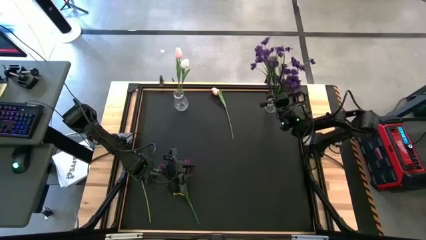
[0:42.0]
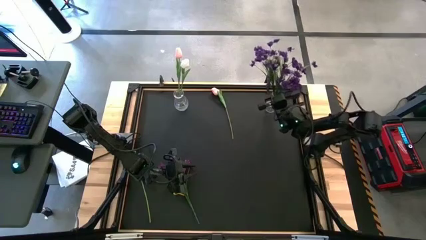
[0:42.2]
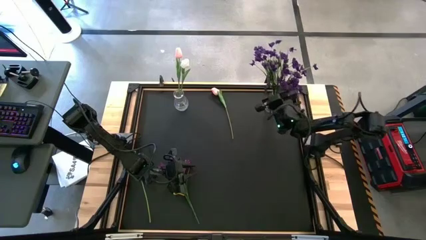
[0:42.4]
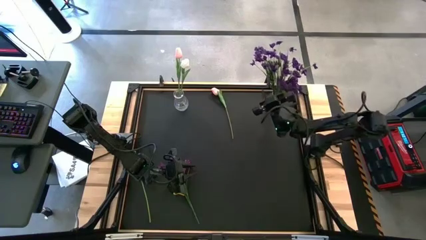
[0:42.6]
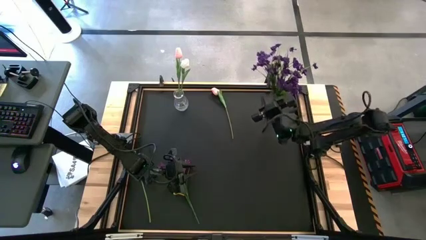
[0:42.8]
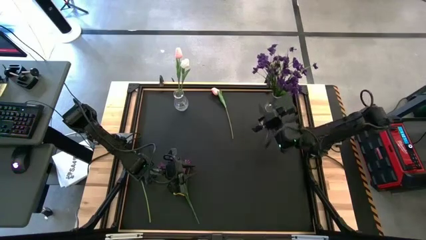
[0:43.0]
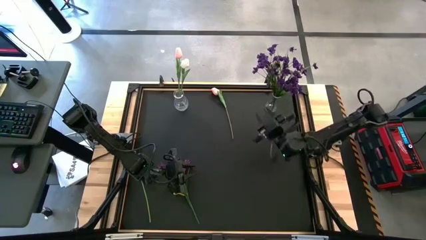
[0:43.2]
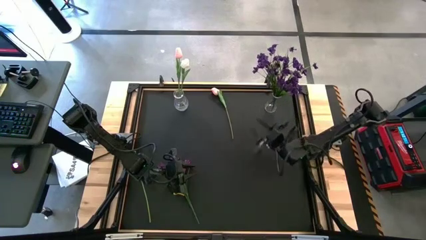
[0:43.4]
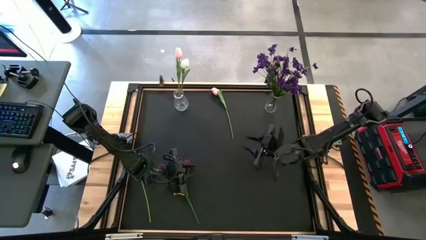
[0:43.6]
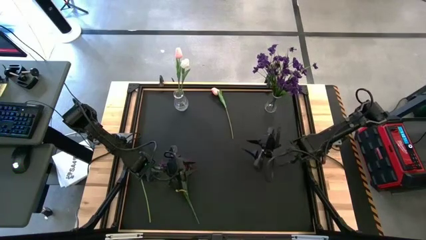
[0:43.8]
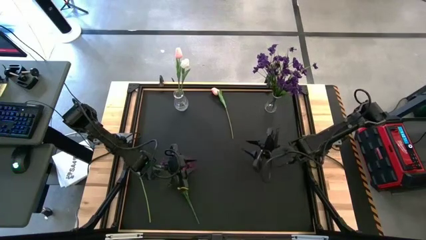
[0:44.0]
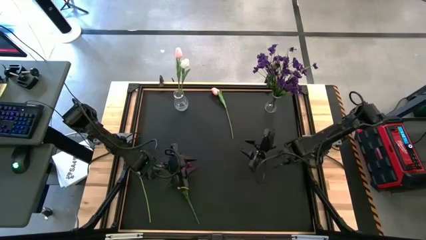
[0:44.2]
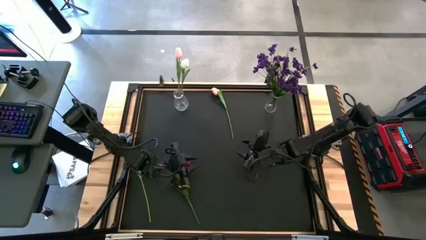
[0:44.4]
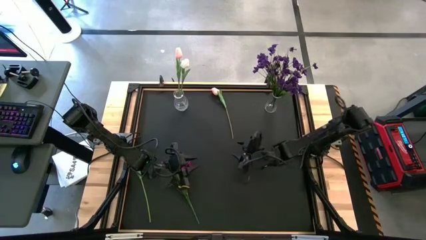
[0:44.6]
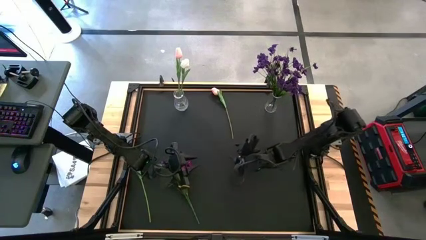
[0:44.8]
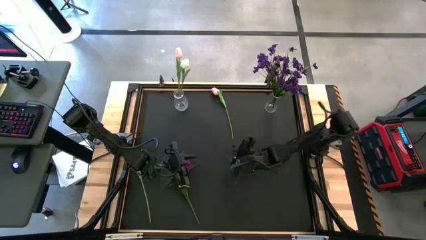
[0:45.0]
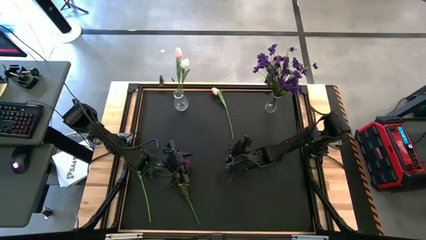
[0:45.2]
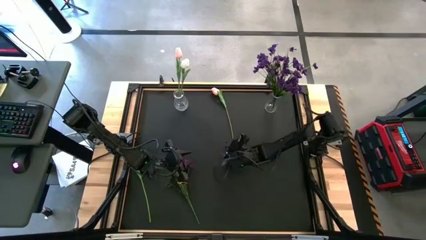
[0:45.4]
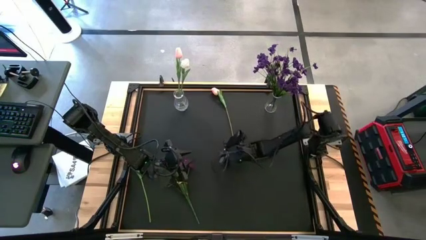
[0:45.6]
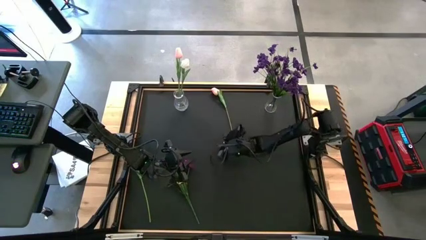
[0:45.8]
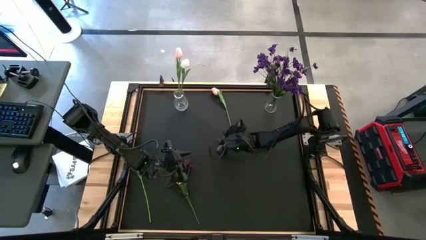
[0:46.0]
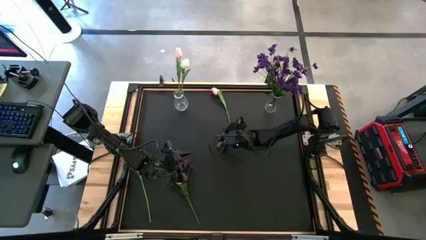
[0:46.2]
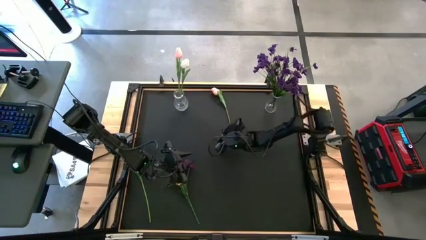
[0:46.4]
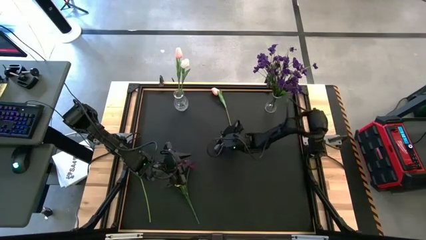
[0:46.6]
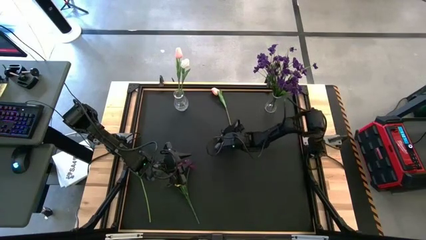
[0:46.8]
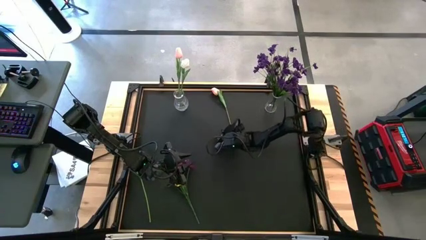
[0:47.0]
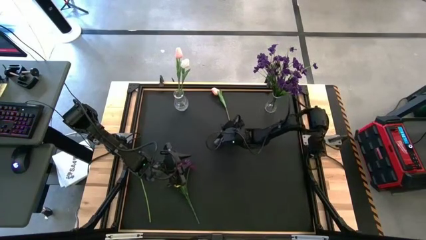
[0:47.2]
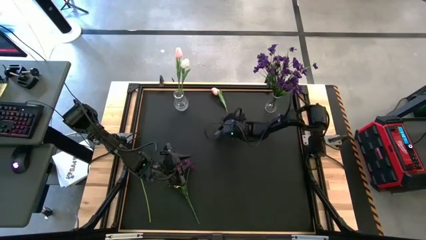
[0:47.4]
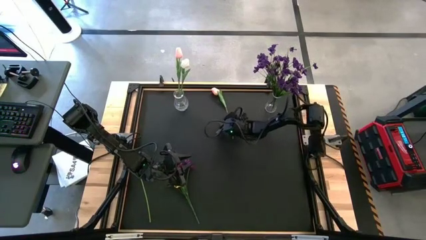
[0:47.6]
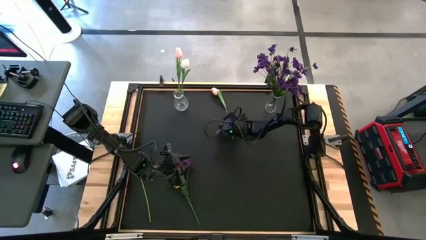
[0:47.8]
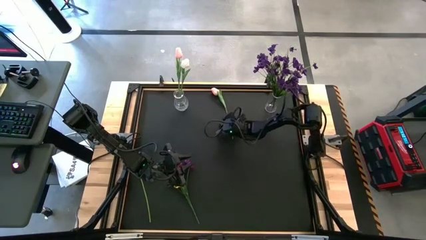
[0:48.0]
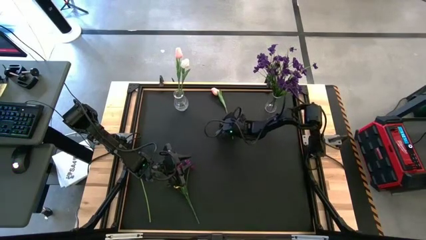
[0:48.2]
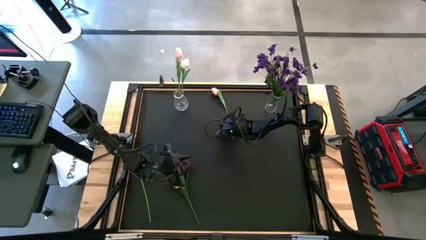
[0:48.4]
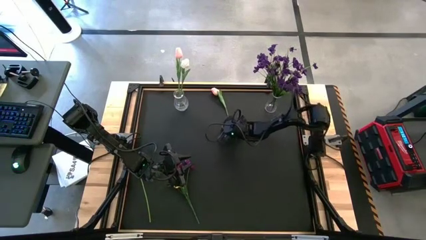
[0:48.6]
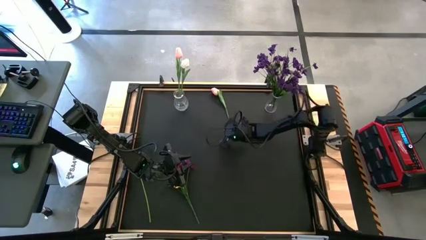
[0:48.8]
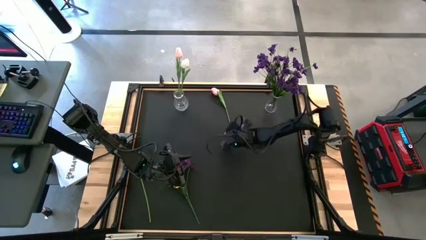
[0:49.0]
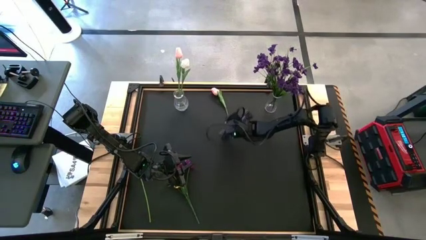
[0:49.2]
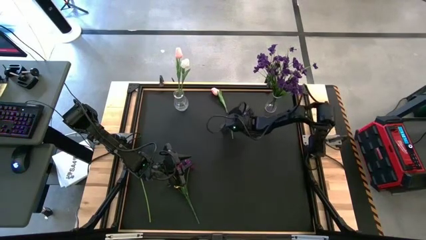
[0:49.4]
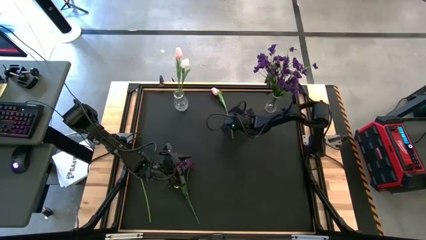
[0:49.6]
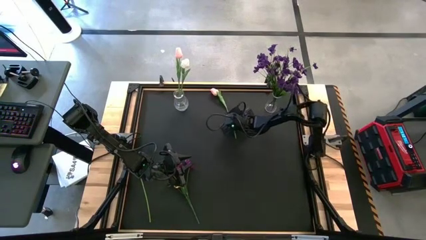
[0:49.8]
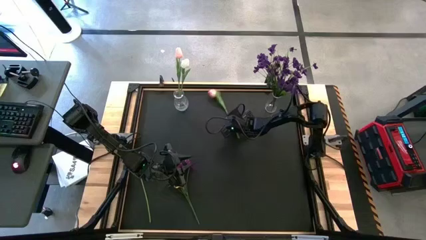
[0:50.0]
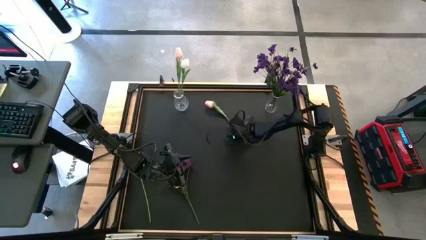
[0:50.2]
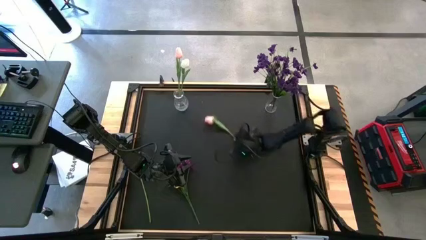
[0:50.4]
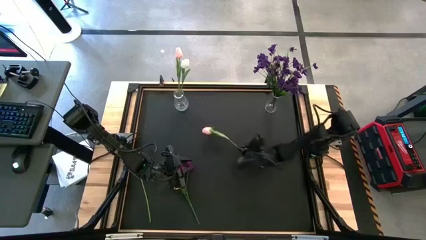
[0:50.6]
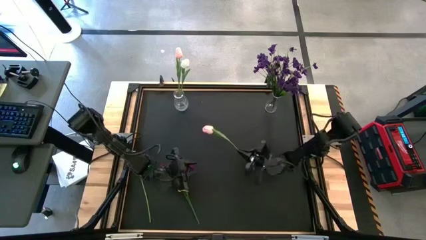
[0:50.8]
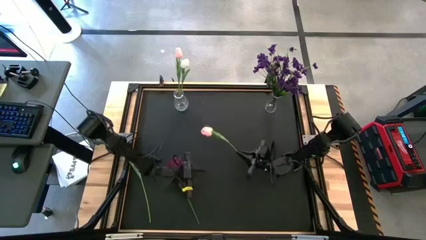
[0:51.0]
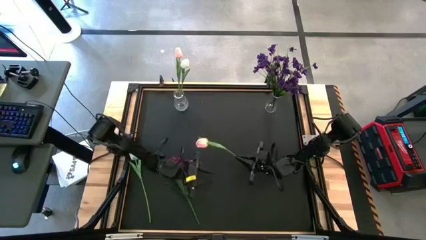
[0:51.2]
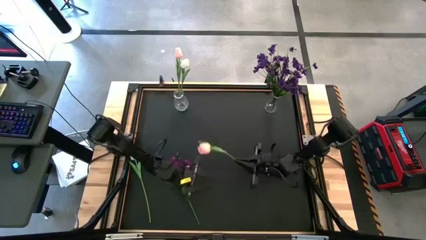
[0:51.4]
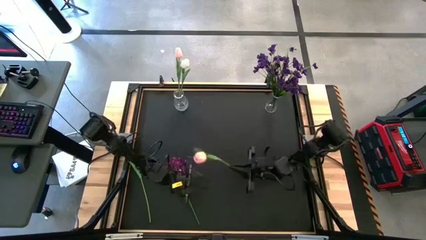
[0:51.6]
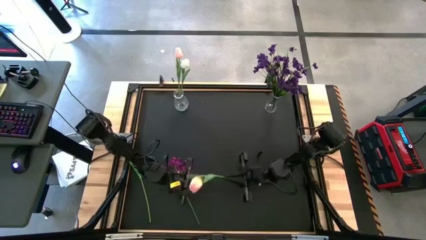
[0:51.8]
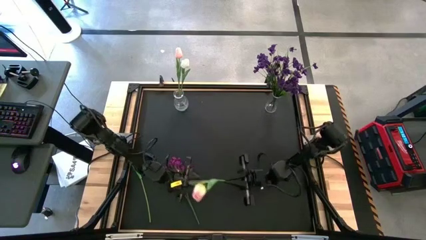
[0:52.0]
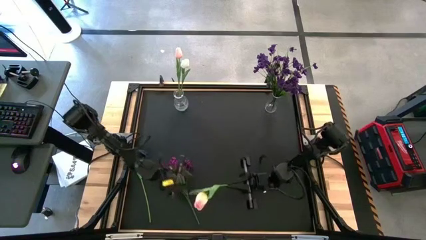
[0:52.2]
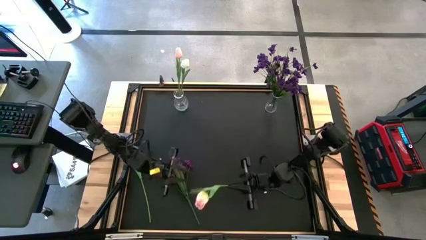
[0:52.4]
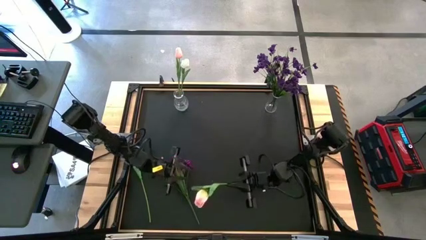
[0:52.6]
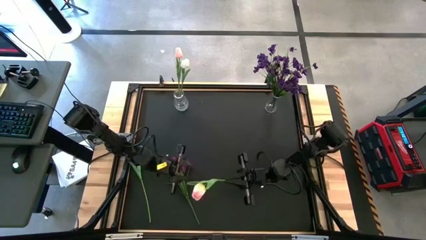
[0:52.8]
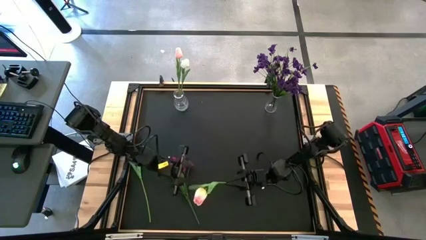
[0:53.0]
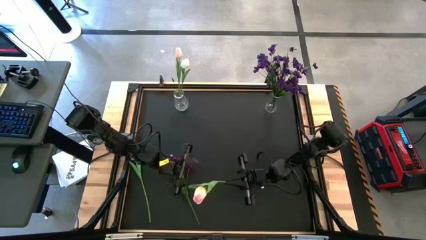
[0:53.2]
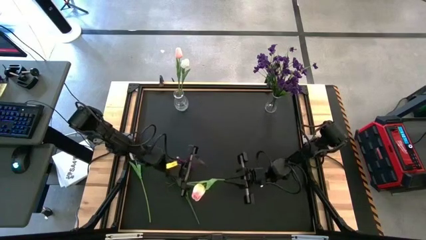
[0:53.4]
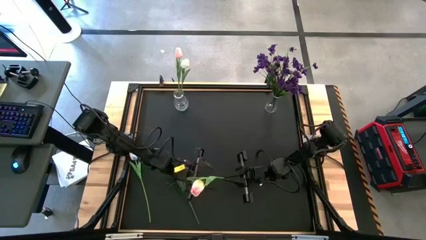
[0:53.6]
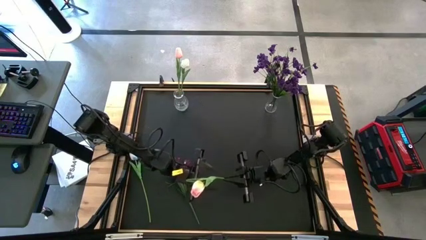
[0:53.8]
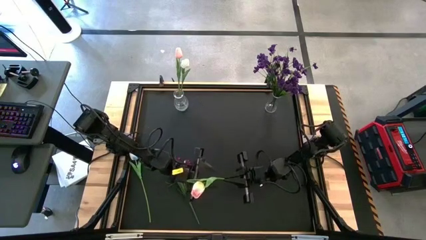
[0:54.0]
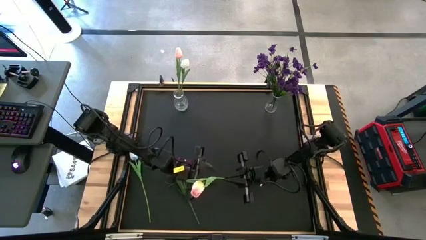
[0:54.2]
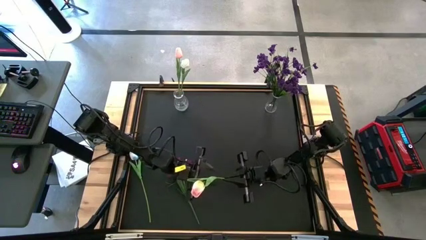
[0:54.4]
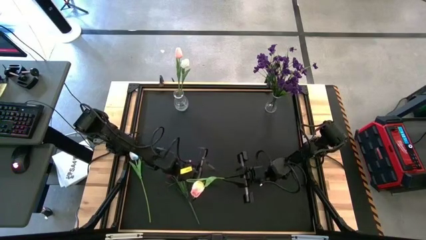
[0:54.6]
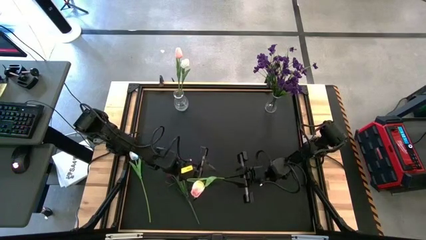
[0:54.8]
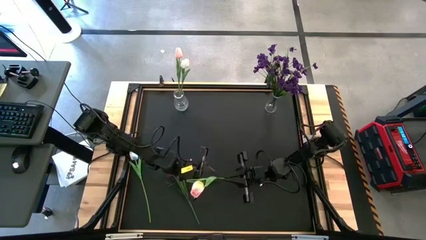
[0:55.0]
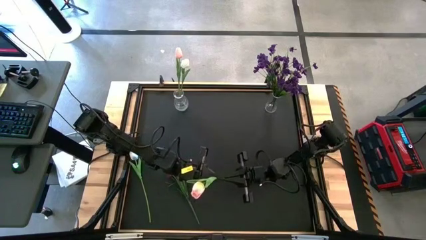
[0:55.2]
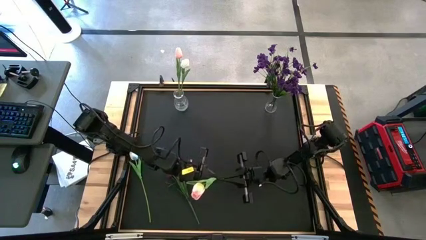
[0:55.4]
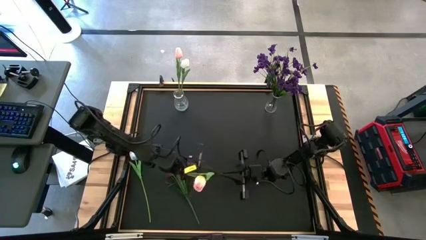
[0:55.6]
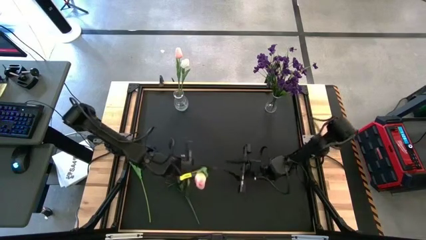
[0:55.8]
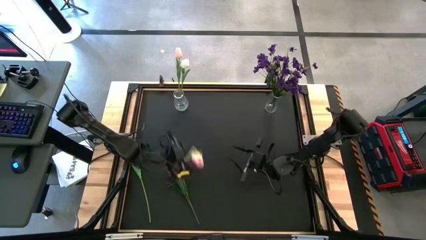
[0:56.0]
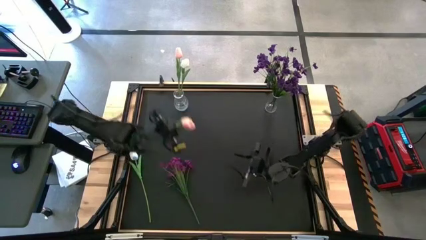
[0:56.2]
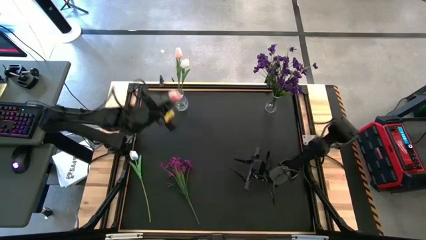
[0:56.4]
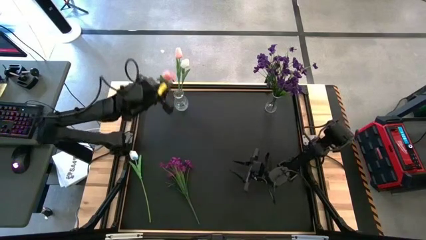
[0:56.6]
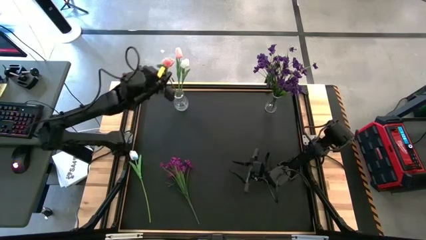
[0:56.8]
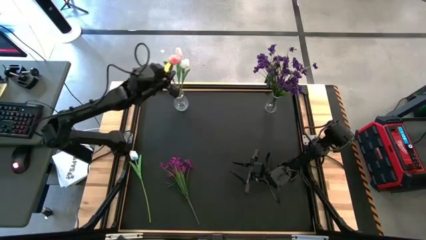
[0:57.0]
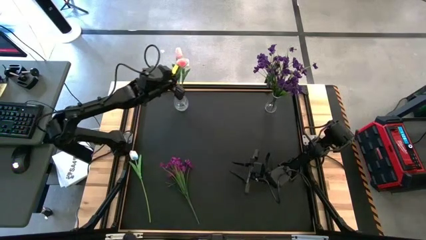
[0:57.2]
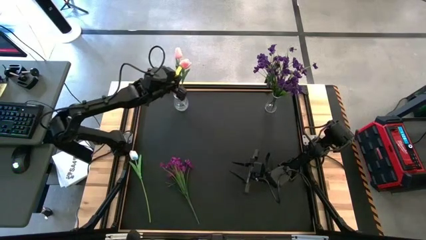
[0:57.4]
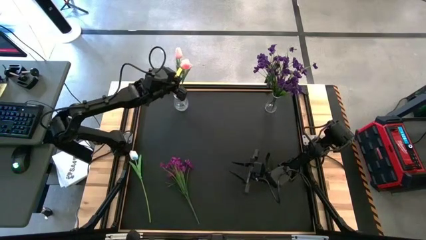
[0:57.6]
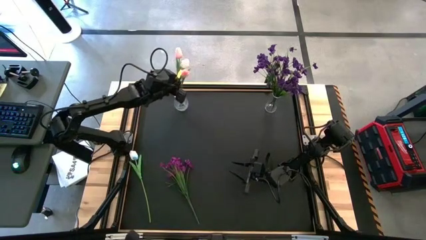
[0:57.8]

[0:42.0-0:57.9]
Task: Sort flowers into vase by color
Put the pink tulip into the left transparent vase
